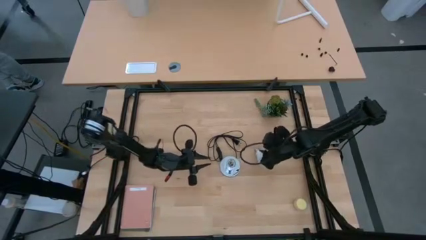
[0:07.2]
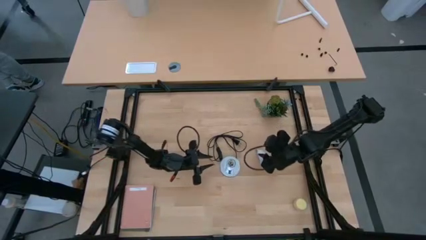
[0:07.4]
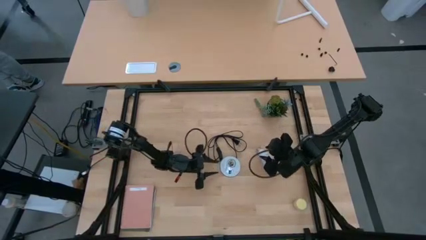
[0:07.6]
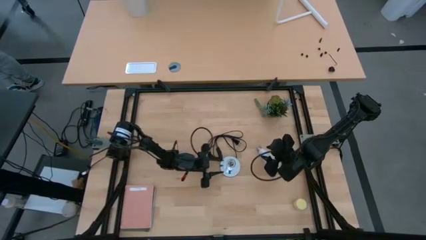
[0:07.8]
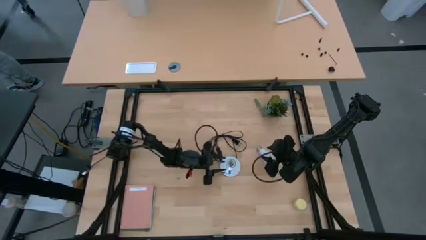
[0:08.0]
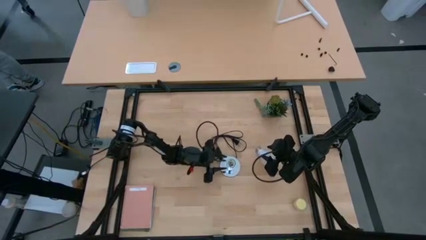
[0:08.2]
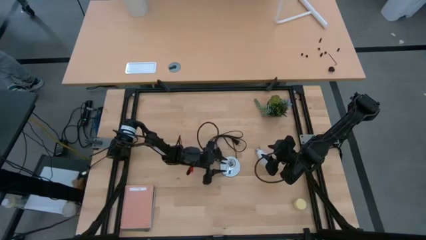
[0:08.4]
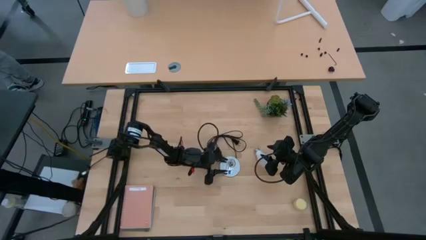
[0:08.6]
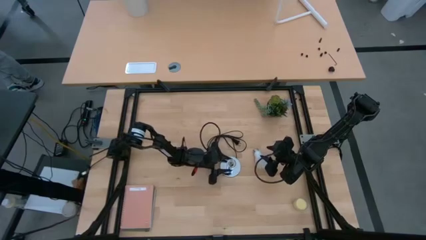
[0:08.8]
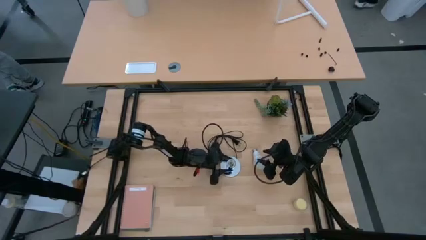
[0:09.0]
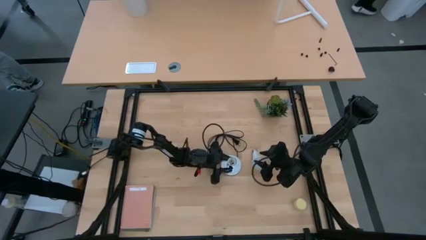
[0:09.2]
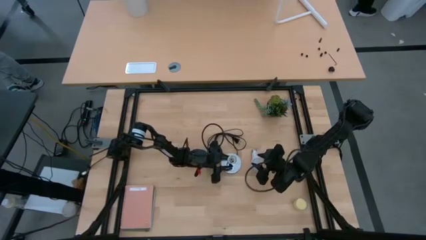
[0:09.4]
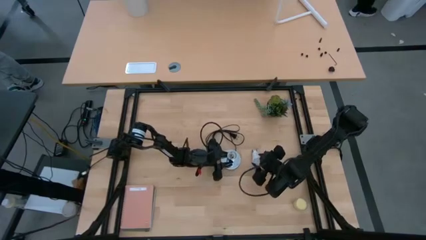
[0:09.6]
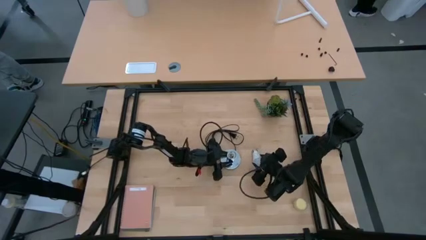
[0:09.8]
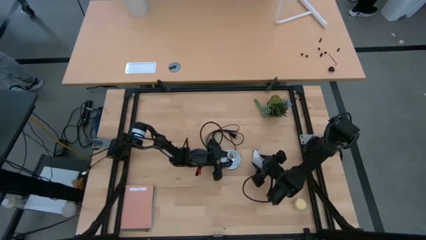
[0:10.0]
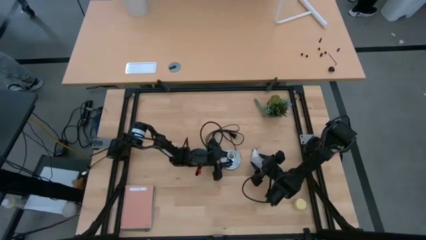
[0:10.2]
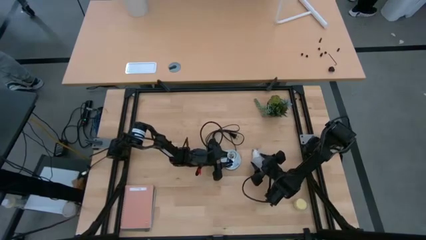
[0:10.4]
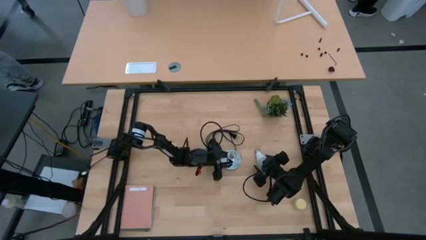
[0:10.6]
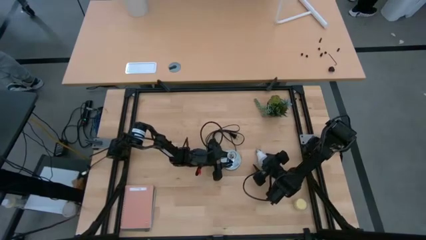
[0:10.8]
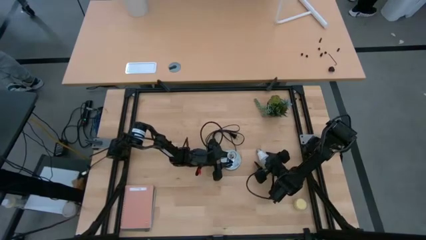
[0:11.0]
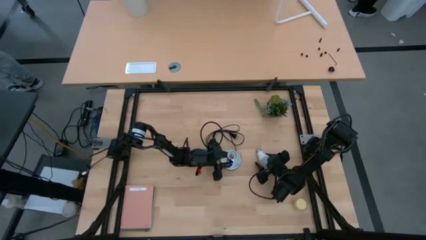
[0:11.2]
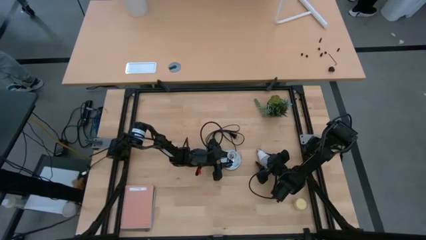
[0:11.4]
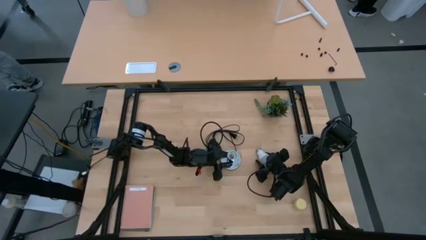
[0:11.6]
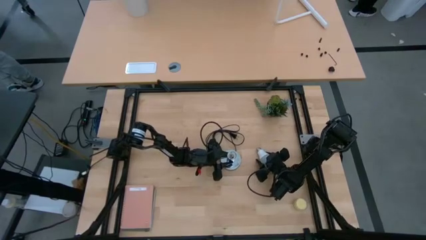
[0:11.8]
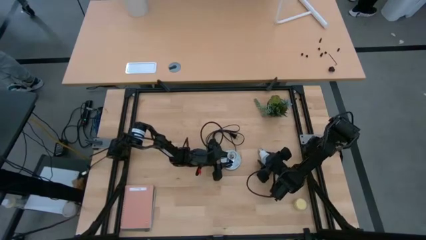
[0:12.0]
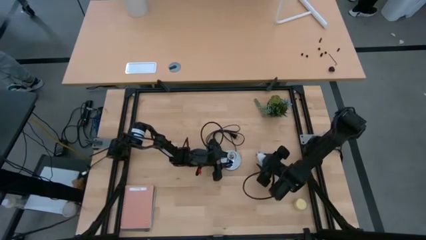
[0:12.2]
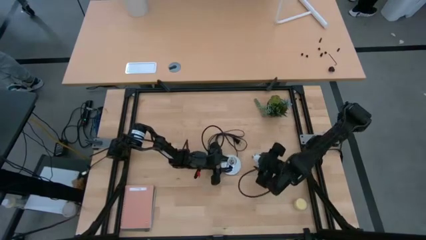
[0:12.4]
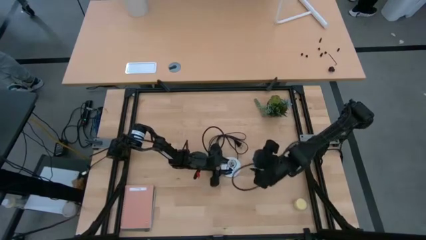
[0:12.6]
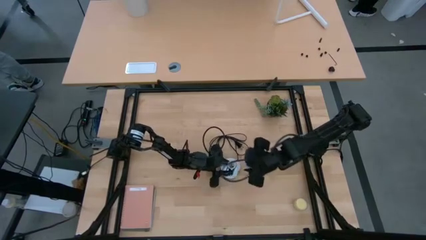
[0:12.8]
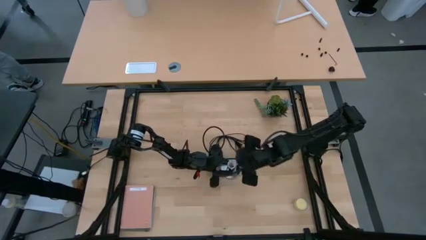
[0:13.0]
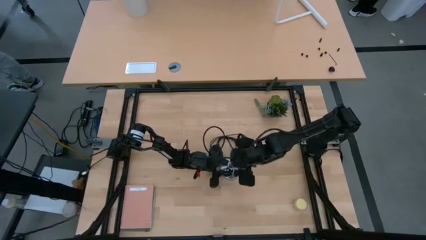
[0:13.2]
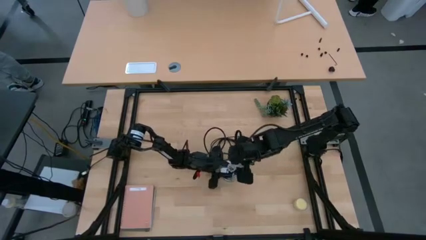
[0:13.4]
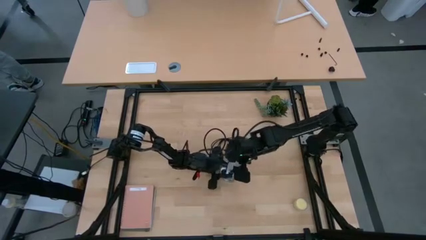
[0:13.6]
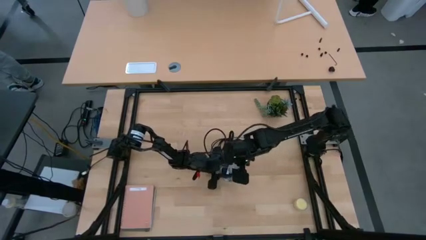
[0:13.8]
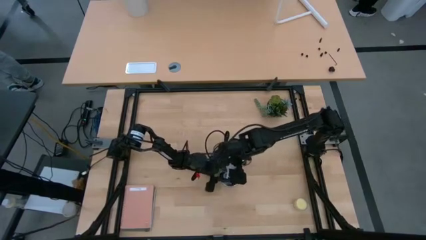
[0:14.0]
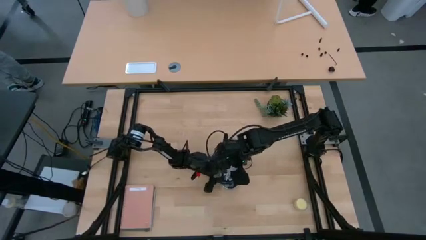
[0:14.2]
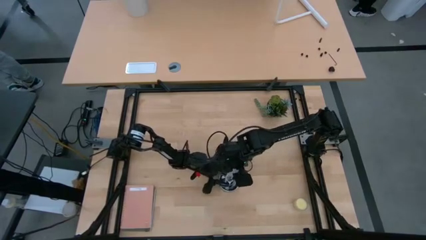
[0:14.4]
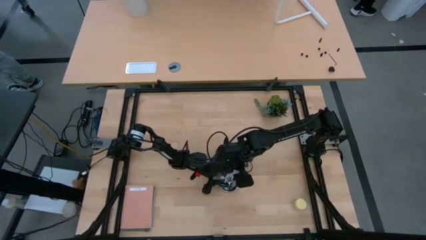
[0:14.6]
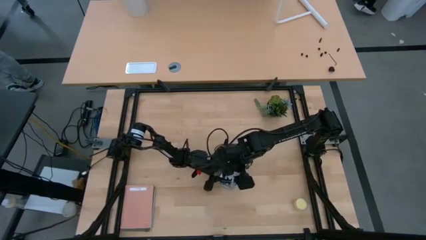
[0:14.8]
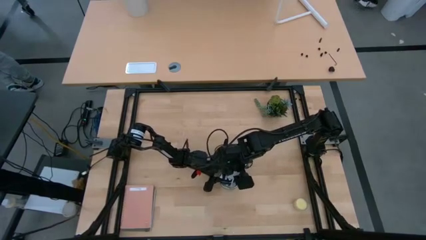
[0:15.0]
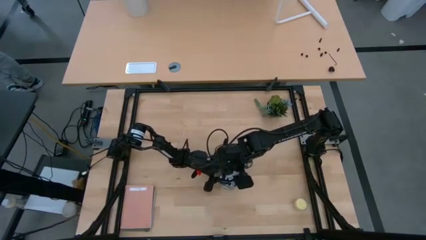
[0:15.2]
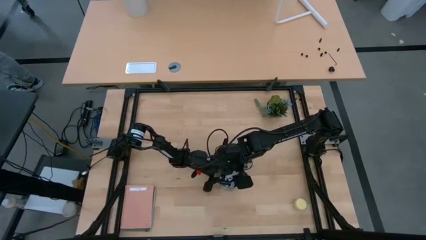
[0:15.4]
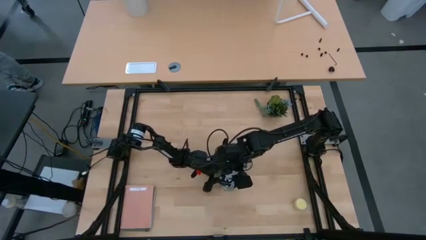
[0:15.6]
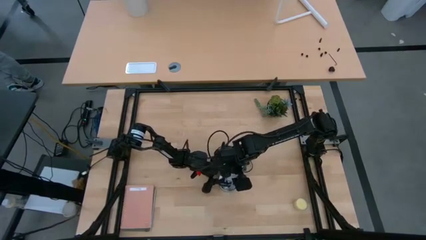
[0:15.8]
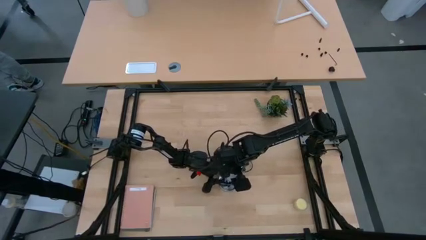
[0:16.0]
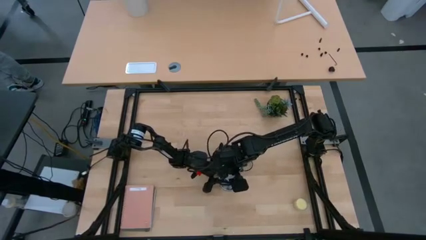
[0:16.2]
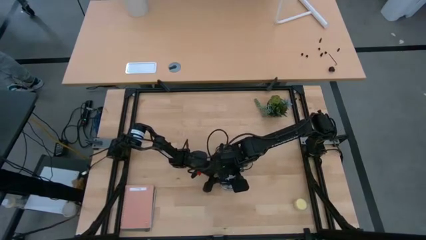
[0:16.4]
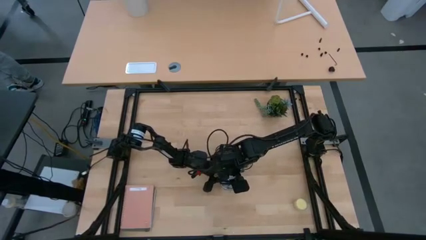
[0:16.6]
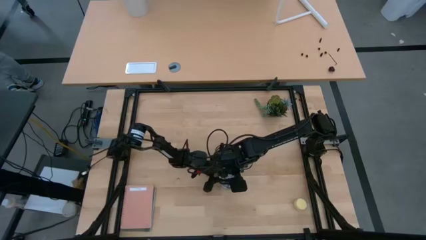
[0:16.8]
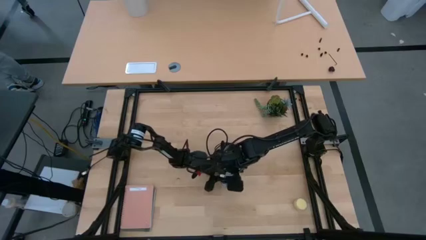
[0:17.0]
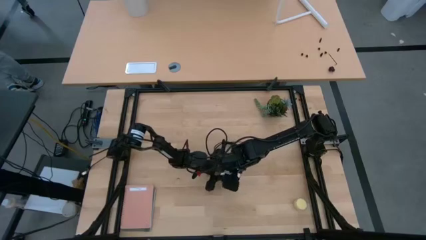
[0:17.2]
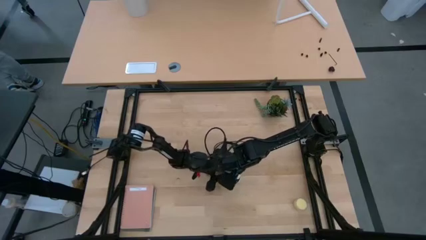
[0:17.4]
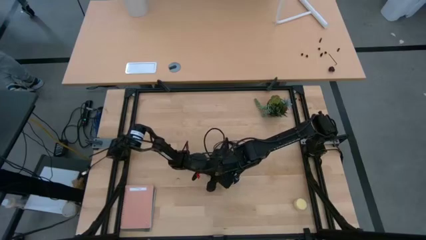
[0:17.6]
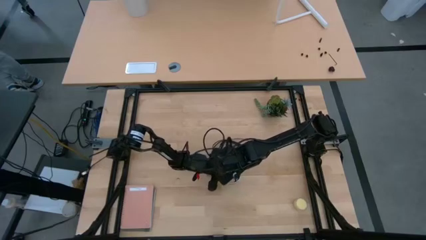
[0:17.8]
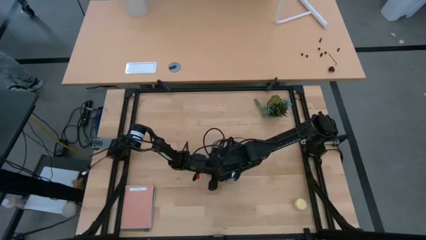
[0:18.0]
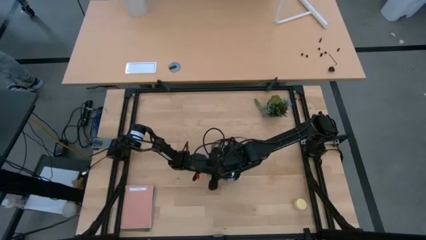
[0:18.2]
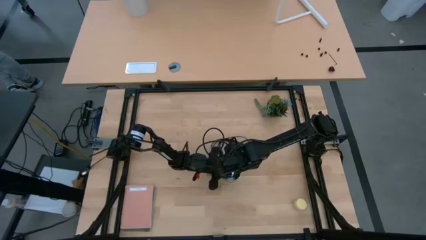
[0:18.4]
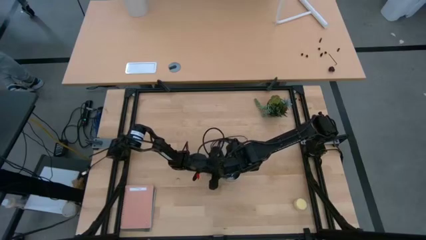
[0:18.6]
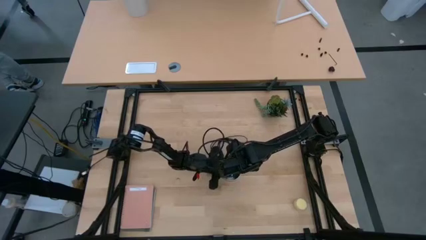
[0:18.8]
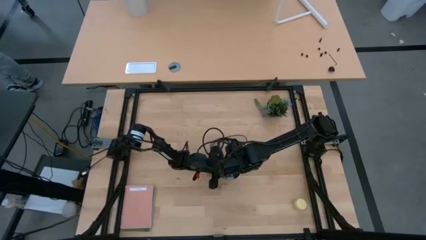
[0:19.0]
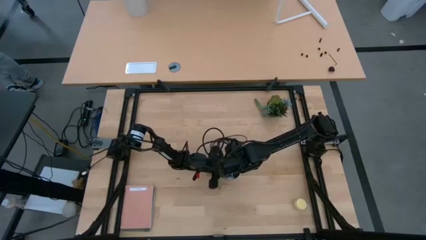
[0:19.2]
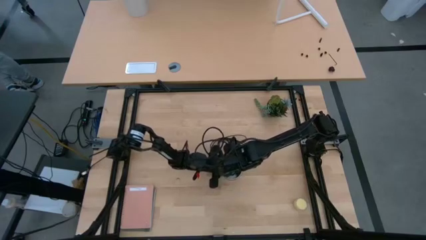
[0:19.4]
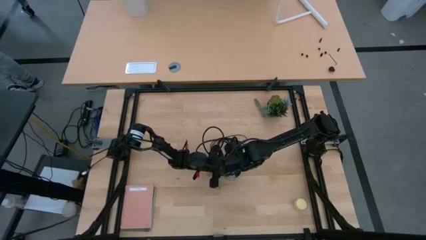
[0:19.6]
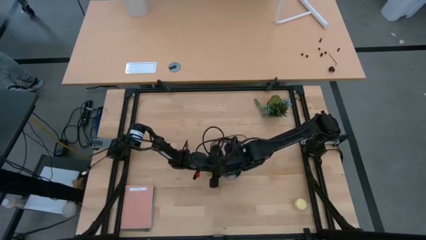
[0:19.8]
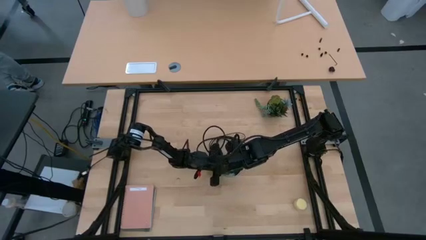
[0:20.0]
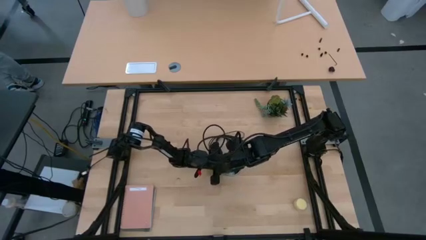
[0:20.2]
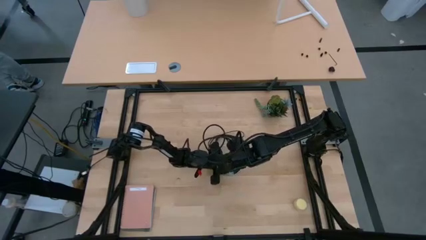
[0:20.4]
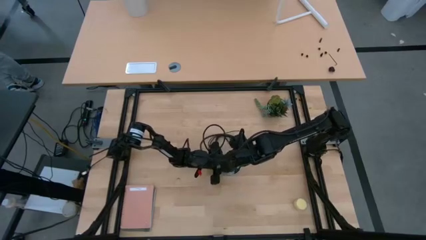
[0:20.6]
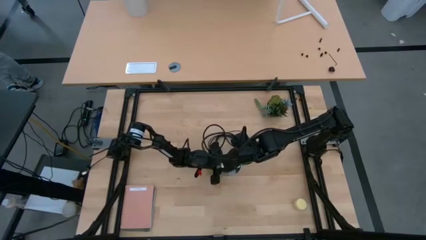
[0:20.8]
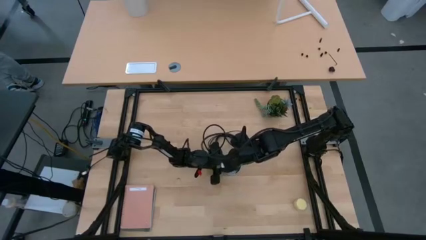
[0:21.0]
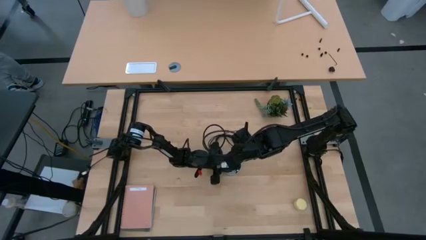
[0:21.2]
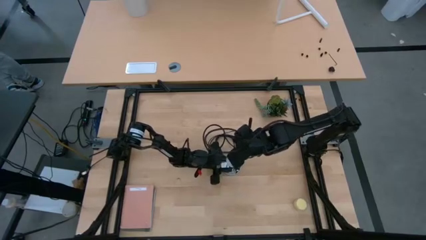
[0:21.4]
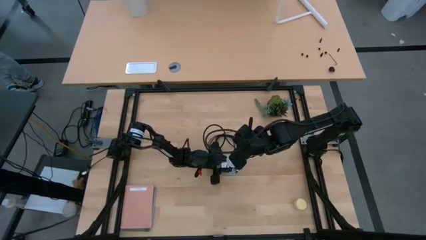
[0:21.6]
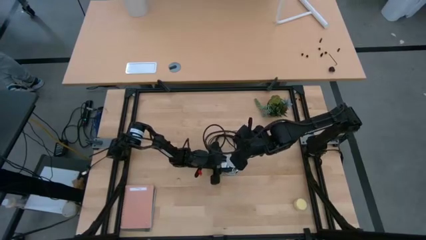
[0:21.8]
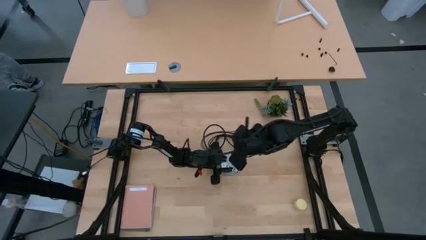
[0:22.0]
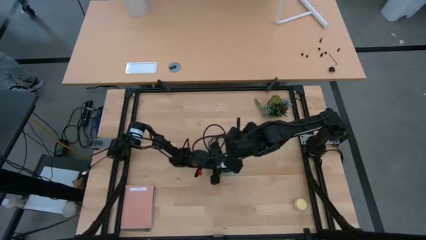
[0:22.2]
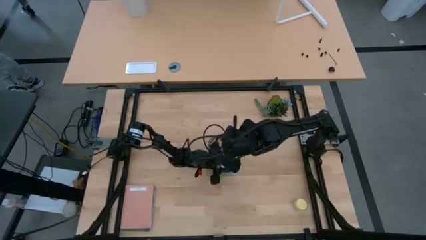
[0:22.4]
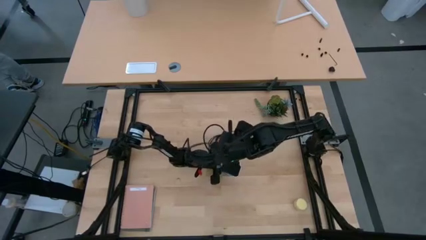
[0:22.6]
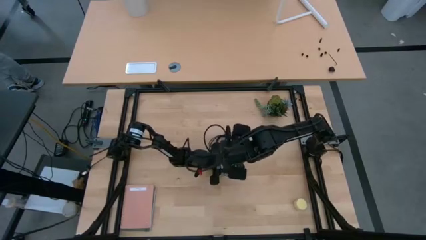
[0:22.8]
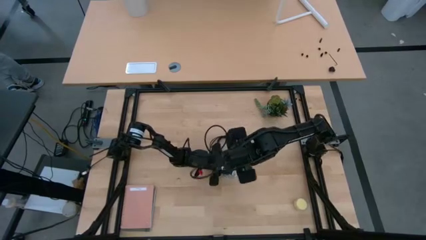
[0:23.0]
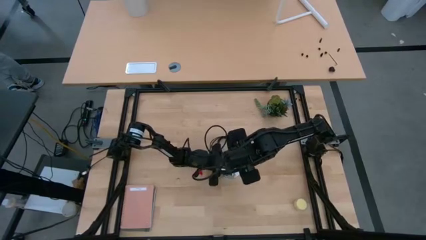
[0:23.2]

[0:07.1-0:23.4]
Task: Screw lightbulb
Insert the lightbulb into the lamp
